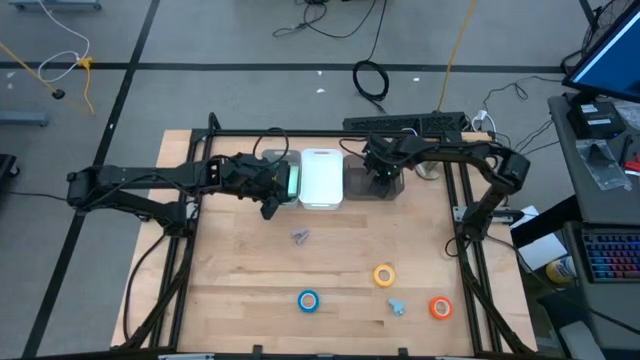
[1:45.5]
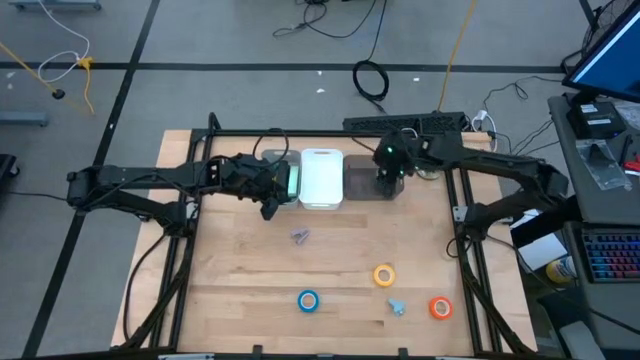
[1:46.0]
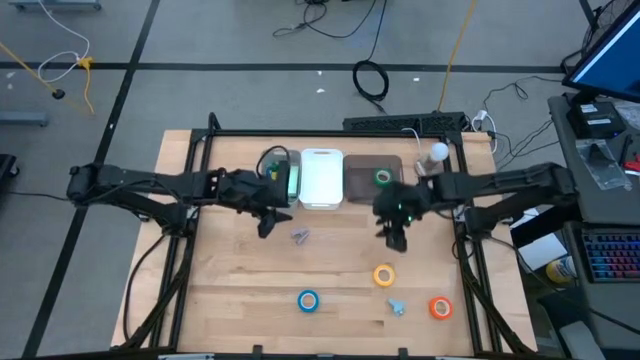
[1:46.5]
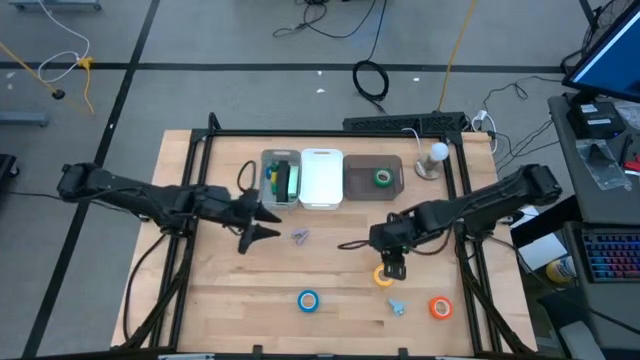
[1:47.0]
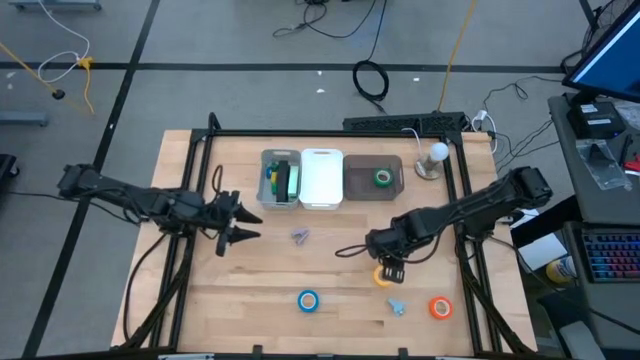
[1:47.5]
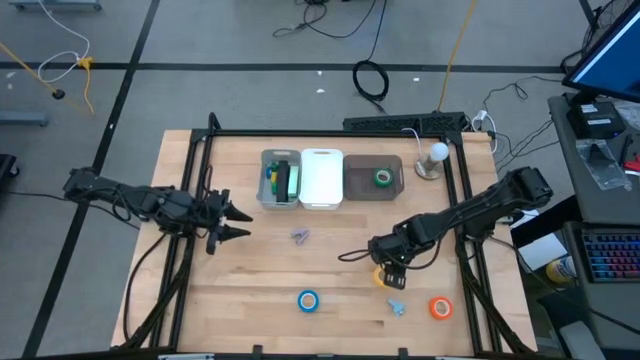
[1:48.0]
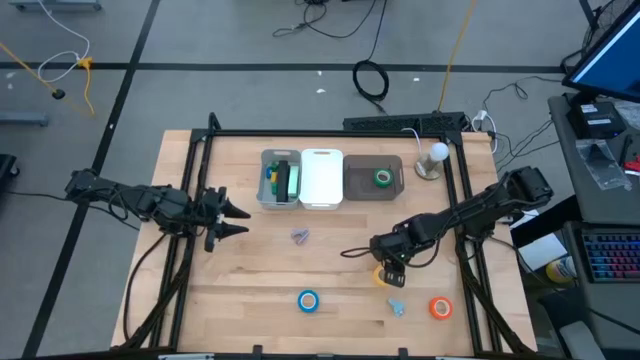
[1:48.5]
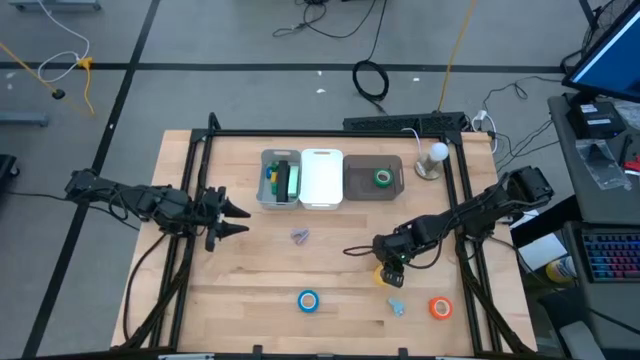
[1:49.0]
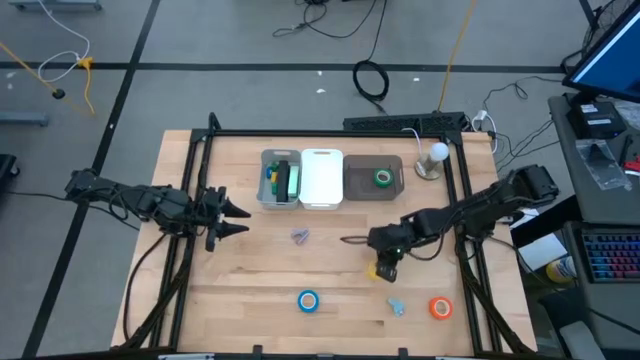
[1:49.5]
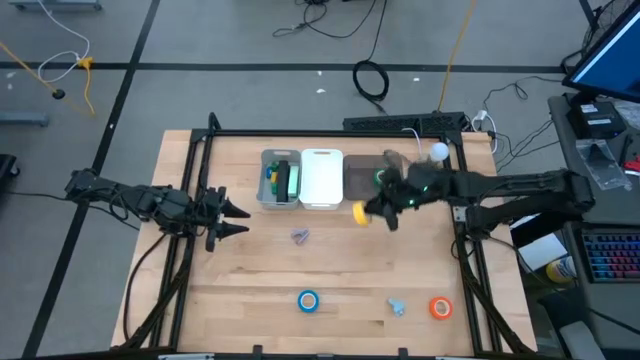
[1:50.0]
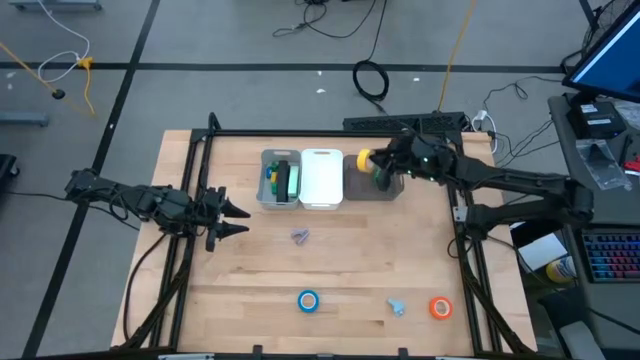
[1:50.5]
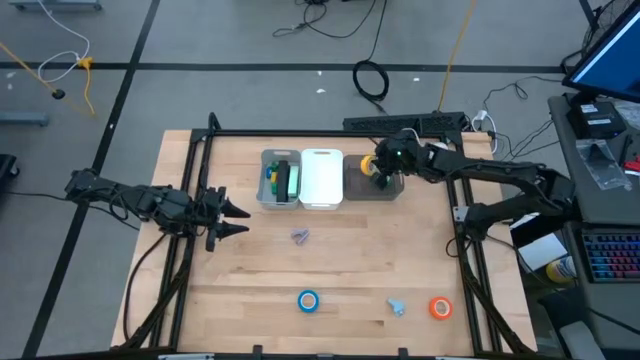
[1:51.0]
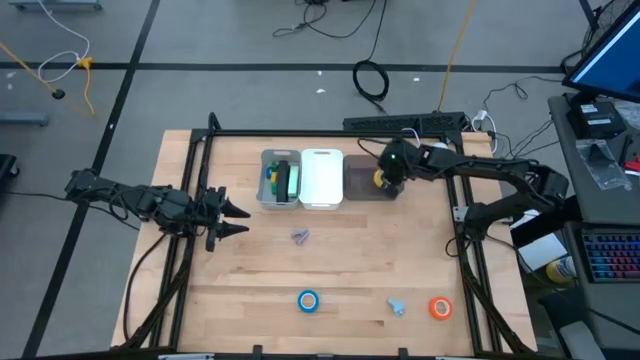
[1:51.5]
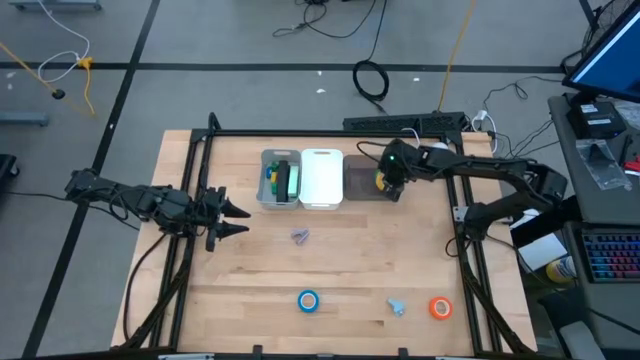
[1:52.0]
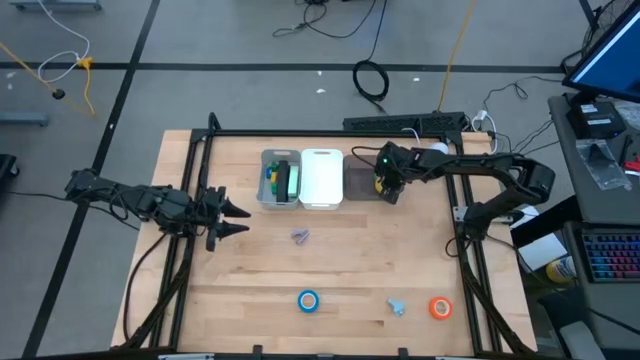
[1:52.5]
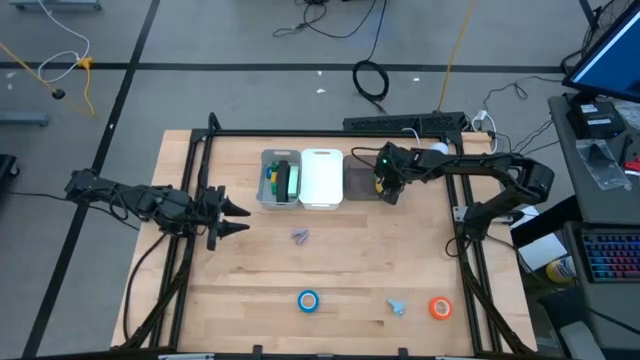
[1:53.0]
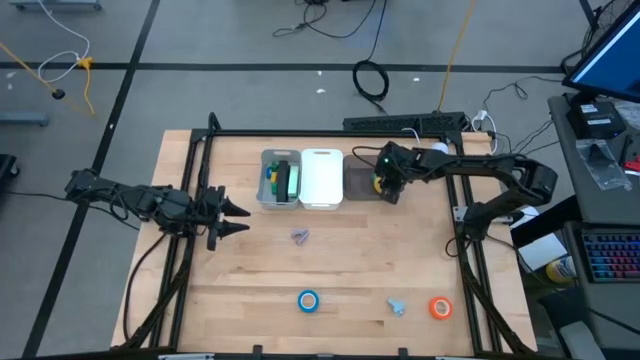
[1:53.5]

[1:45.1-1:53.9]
Task: Pick and place Stapler, Stapler remover, tape
Put the yellow tape into the black bin

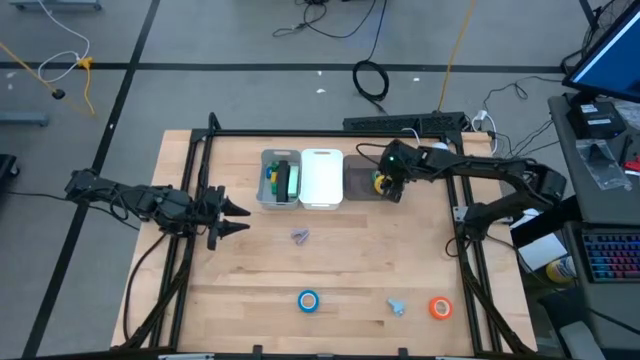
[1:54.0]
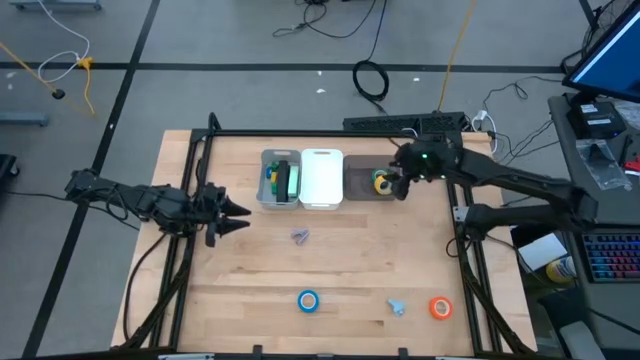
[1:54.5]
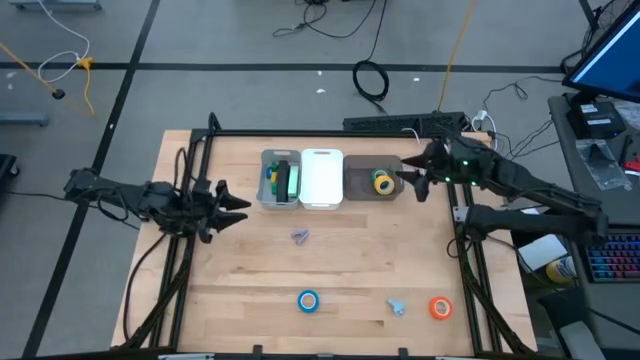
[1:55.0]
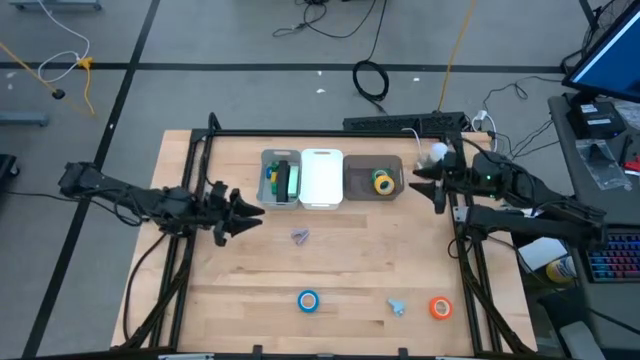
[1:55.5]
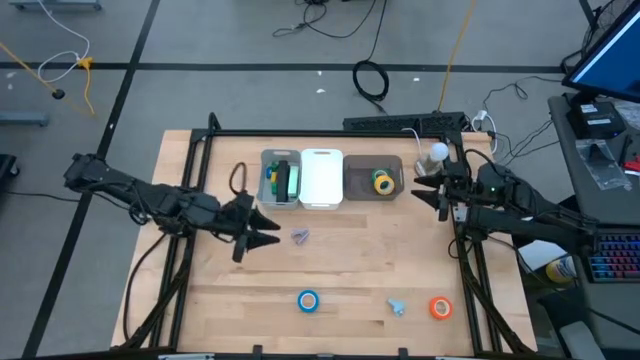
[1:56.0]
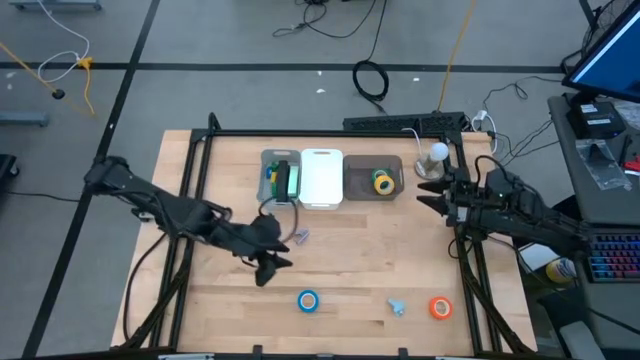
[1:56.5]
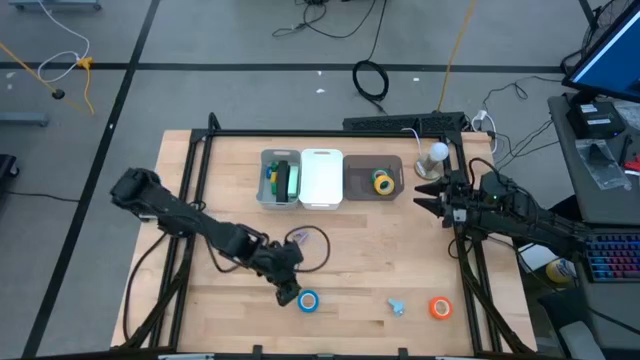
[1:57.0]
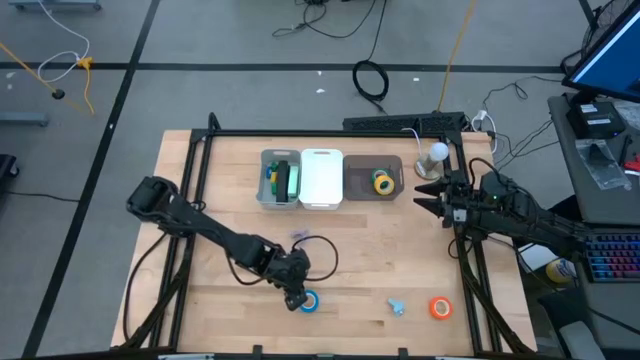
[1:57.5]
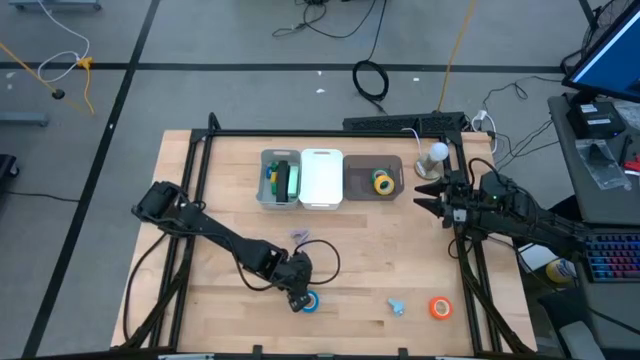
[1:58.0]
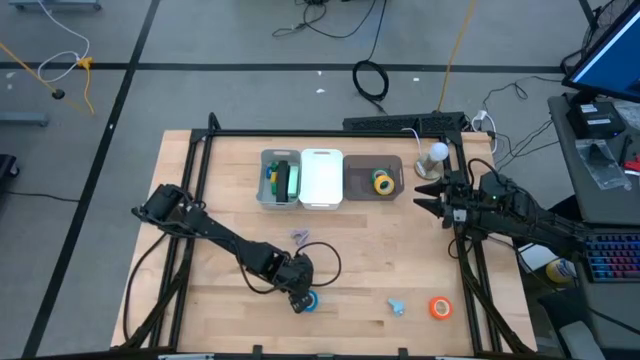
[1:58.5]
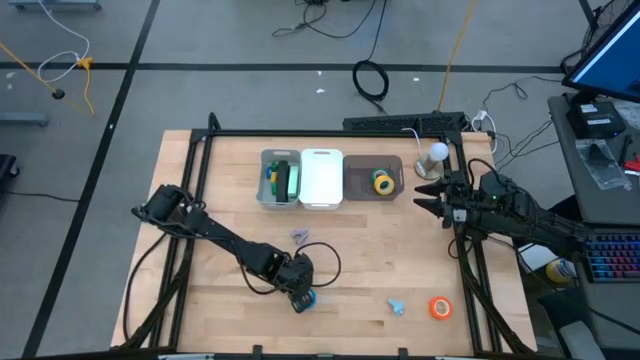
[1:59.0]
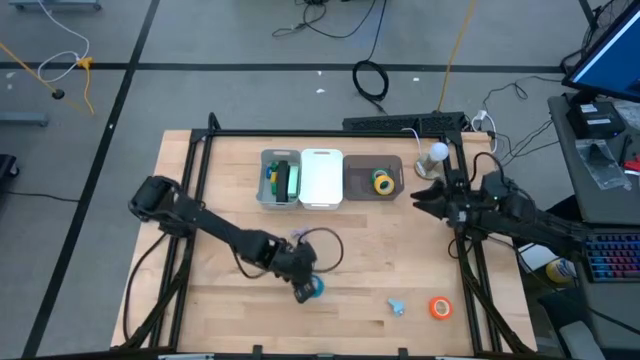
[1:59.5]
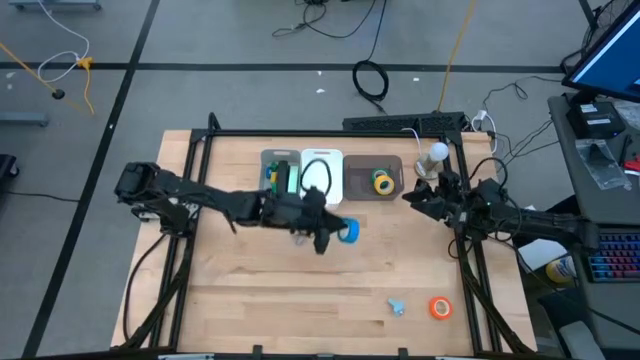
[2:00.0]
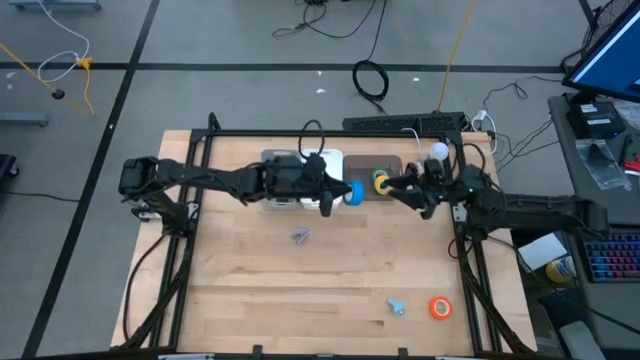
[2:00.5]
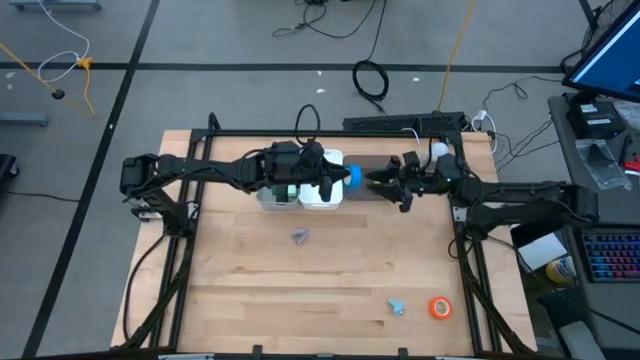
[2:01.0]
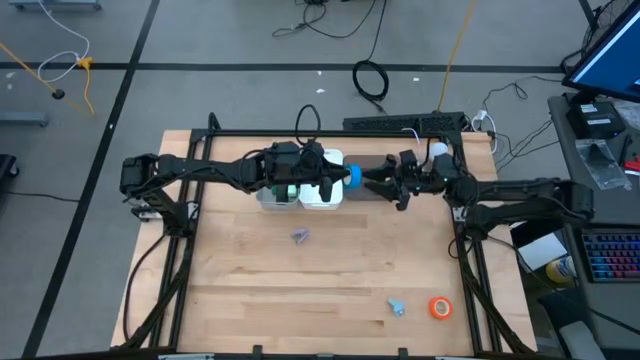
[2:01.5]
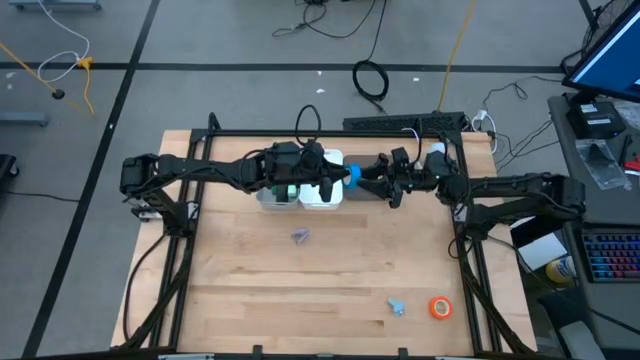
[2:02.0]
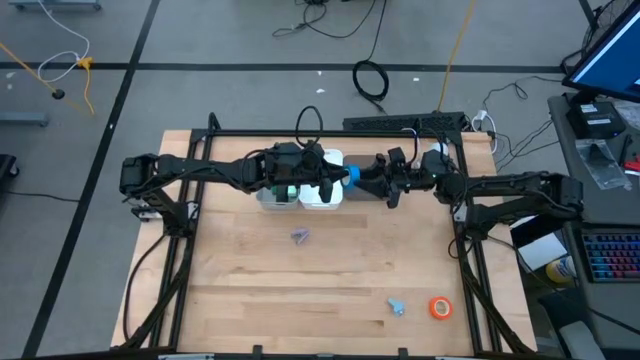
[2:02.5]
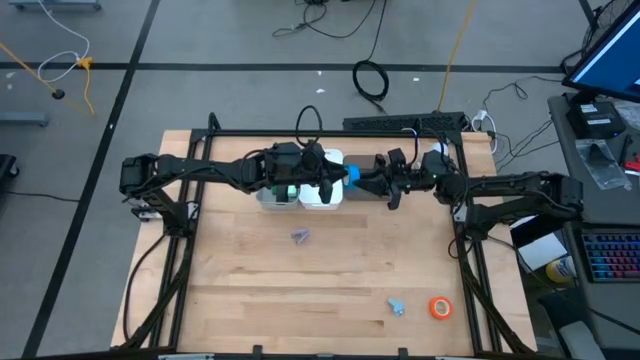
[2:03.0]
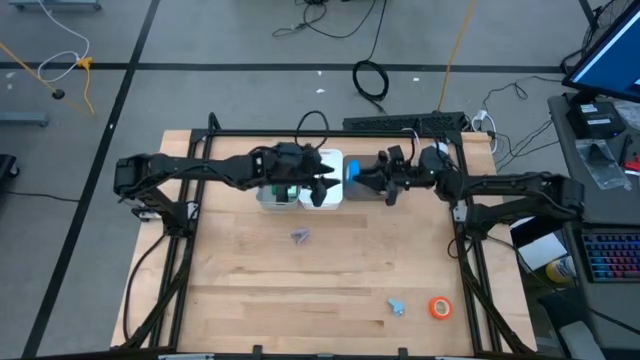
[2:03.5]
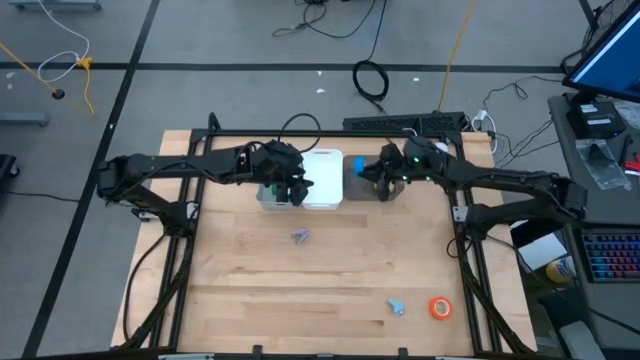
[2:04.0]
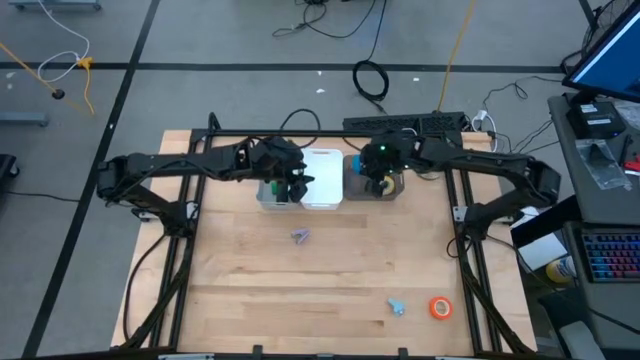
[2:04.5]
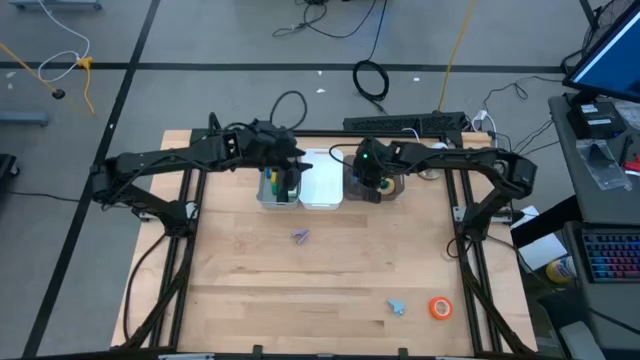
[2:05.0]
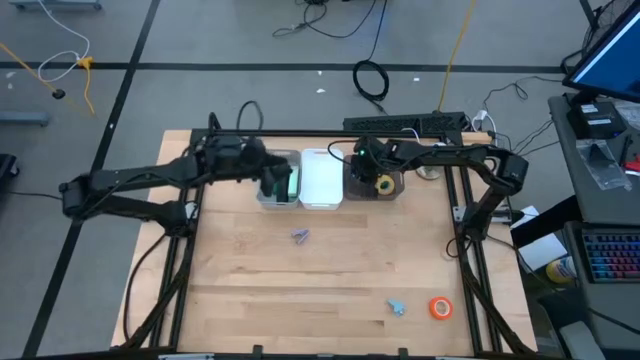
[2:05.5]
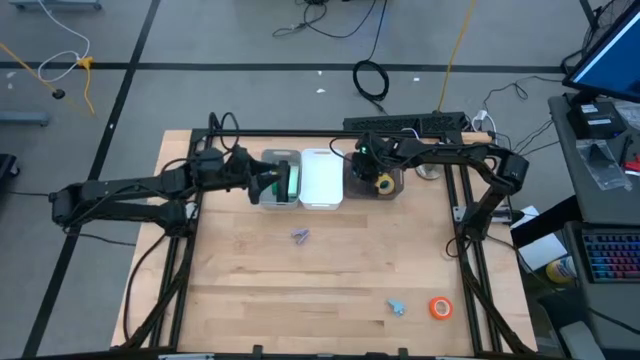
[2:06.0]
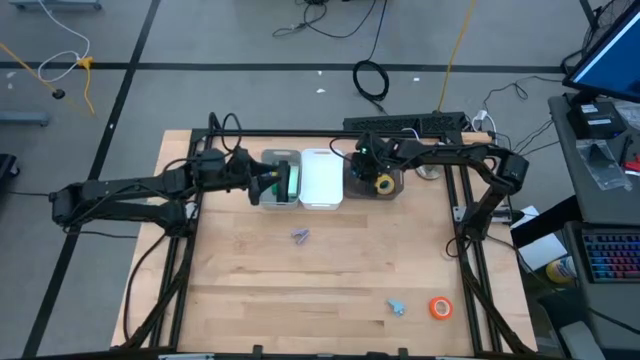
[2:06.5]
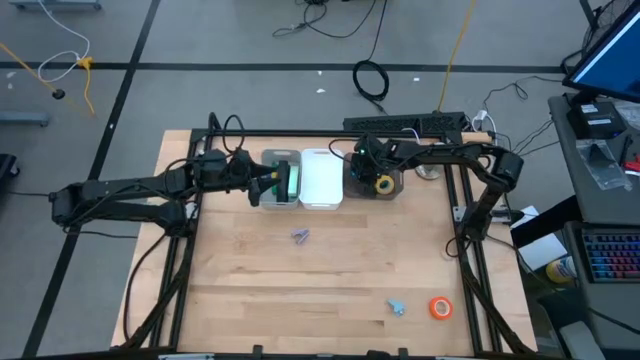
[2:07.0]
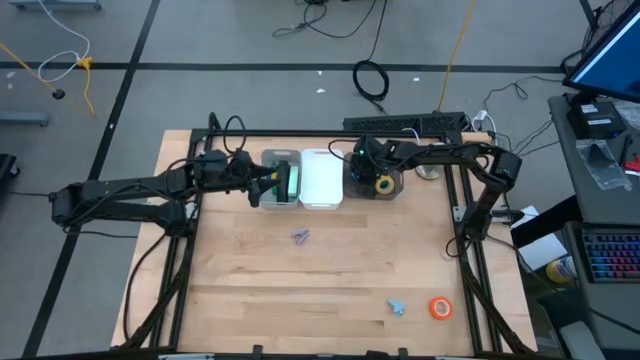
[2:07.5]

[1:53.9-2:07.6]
Put the blue tape into the black bin
